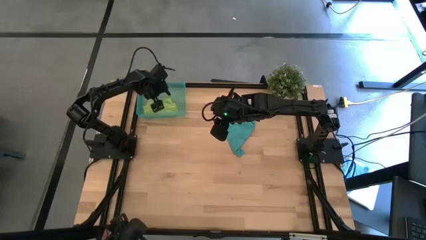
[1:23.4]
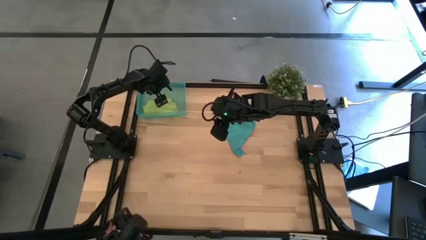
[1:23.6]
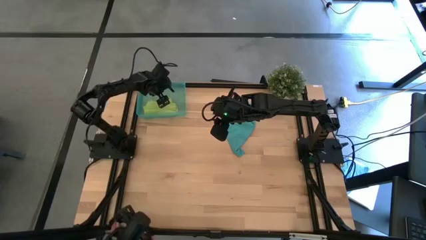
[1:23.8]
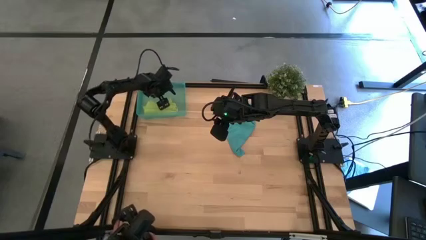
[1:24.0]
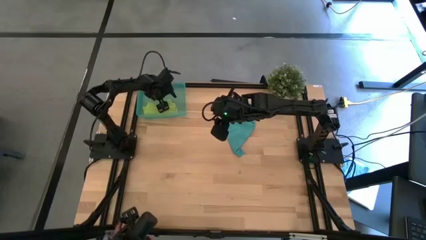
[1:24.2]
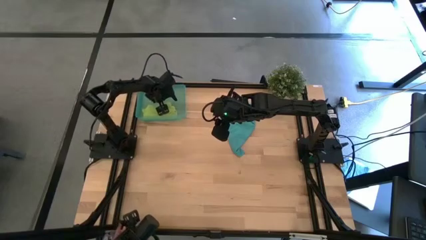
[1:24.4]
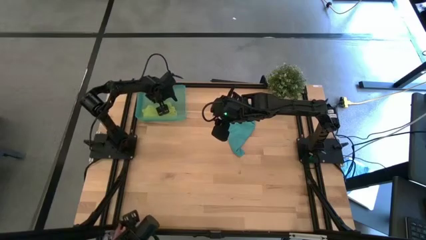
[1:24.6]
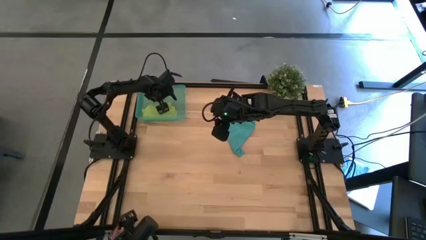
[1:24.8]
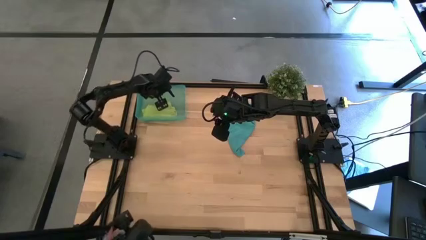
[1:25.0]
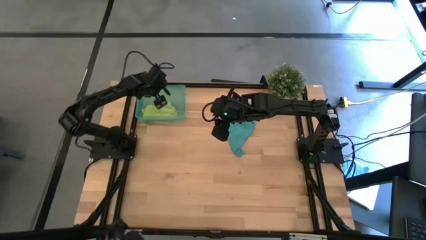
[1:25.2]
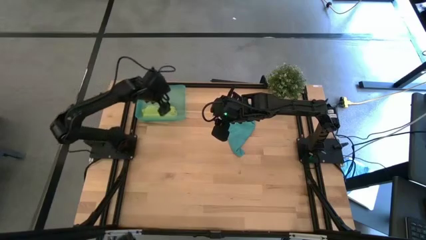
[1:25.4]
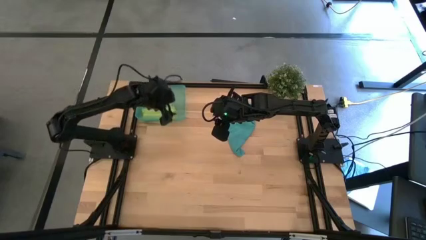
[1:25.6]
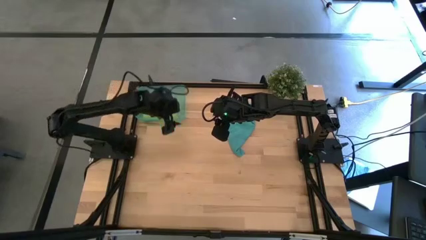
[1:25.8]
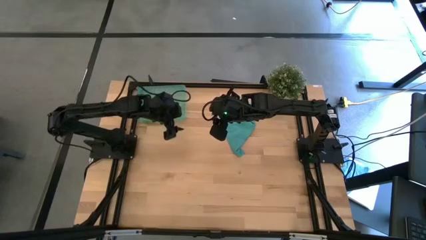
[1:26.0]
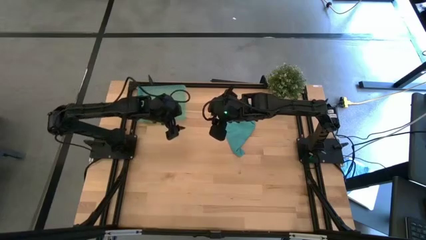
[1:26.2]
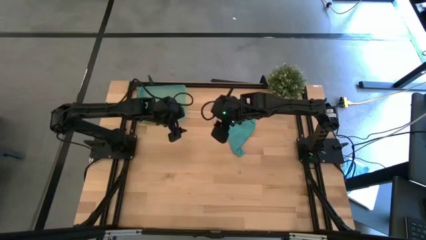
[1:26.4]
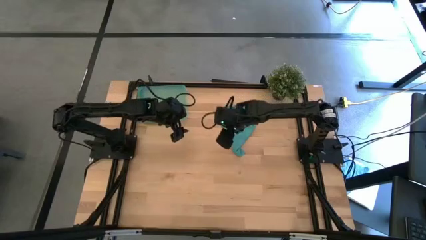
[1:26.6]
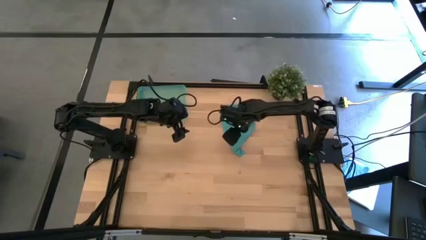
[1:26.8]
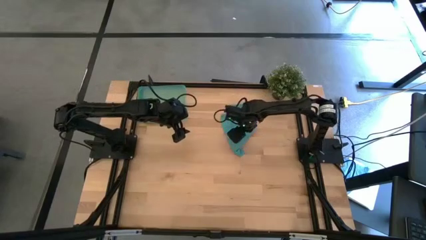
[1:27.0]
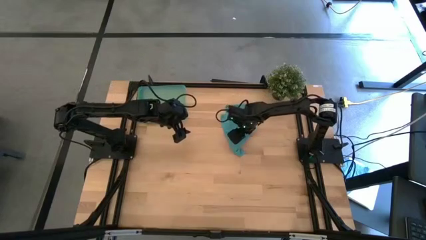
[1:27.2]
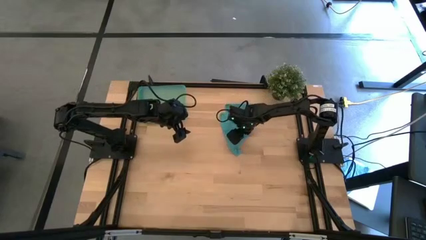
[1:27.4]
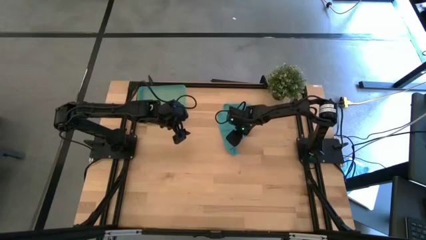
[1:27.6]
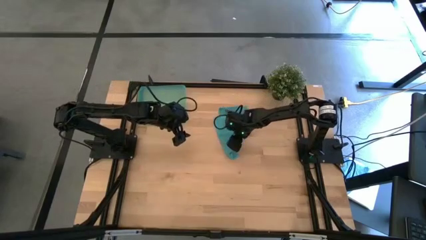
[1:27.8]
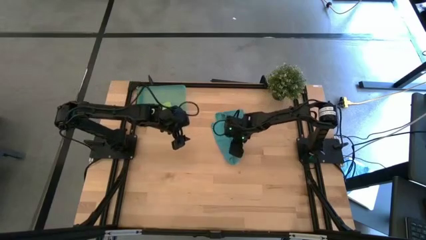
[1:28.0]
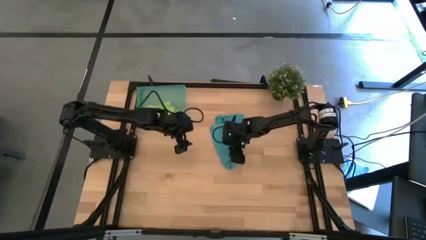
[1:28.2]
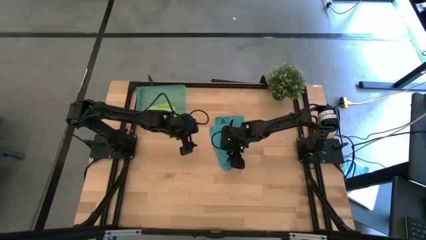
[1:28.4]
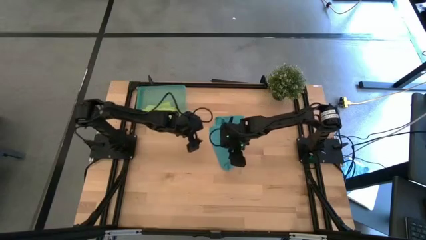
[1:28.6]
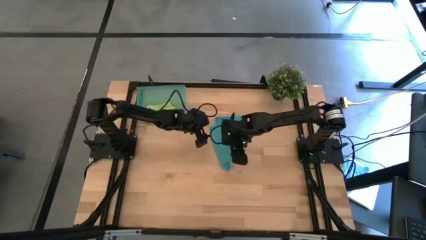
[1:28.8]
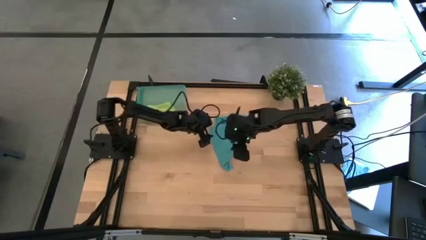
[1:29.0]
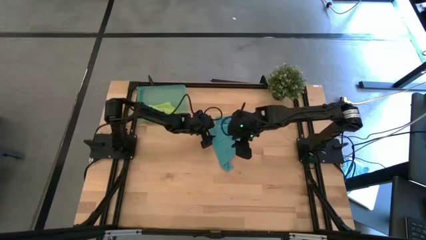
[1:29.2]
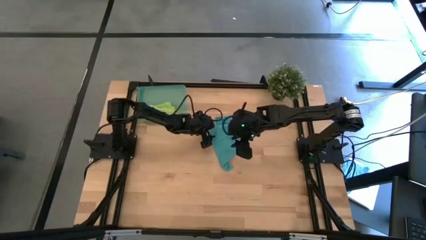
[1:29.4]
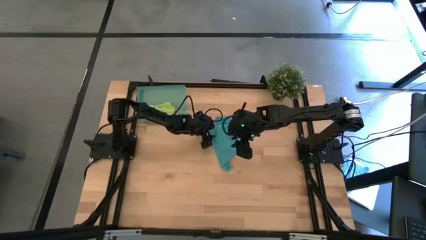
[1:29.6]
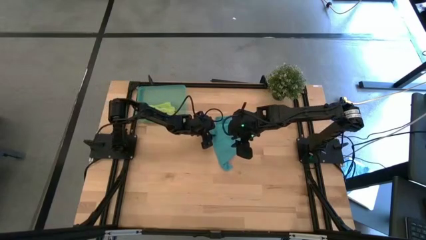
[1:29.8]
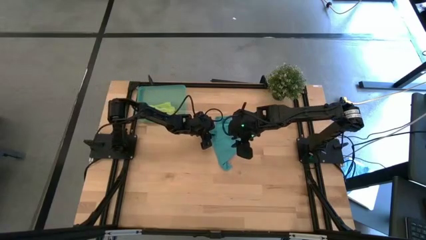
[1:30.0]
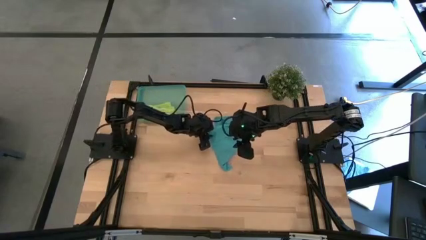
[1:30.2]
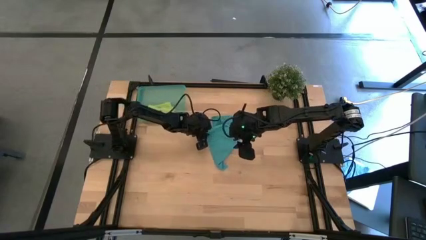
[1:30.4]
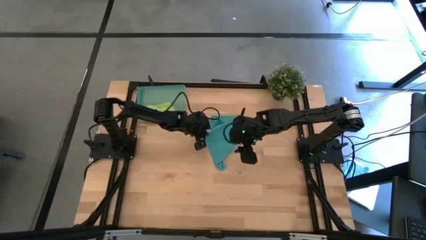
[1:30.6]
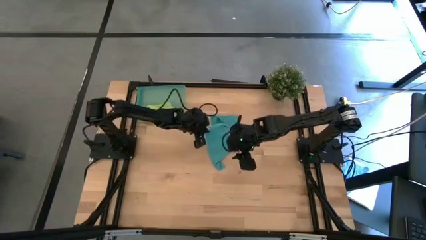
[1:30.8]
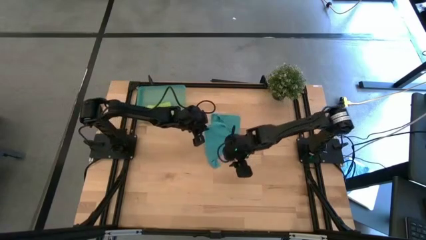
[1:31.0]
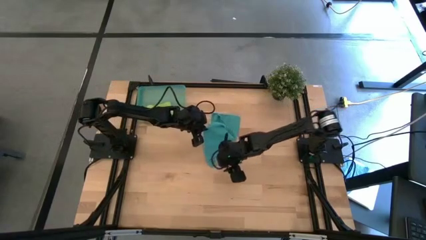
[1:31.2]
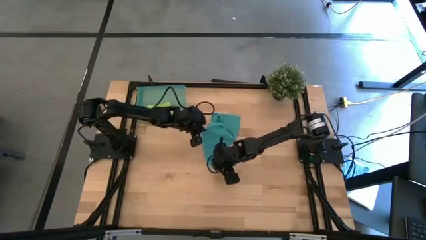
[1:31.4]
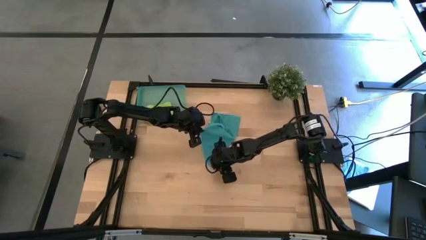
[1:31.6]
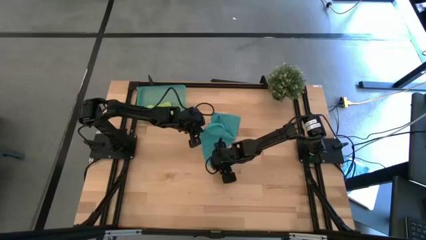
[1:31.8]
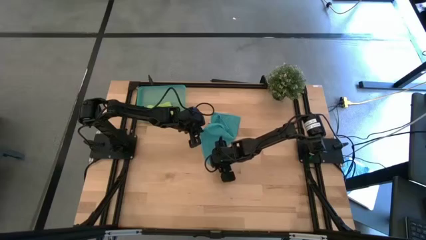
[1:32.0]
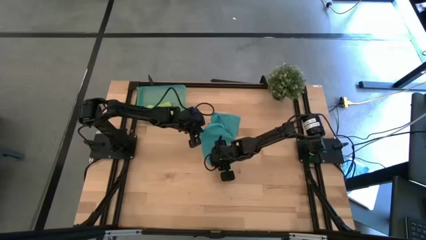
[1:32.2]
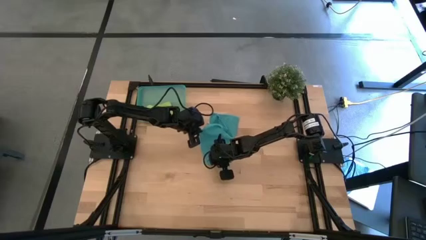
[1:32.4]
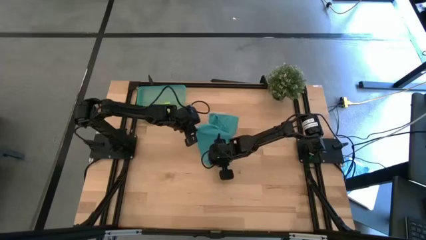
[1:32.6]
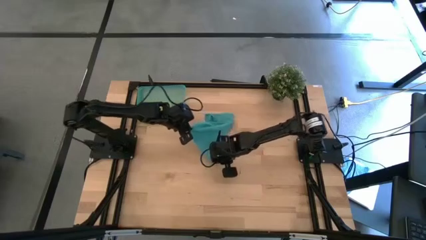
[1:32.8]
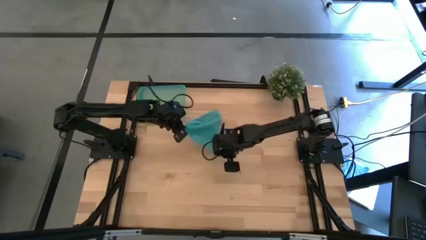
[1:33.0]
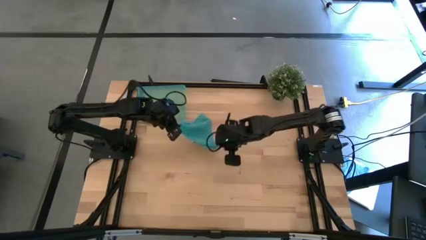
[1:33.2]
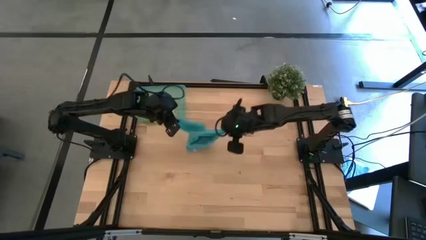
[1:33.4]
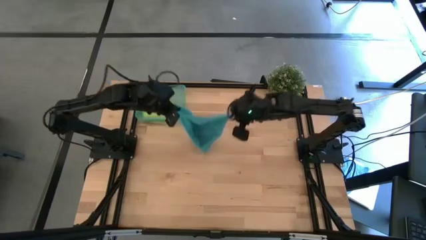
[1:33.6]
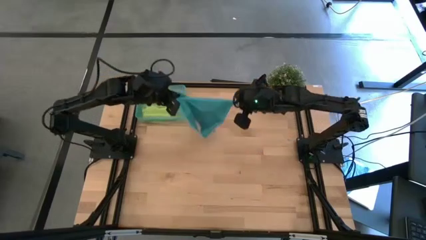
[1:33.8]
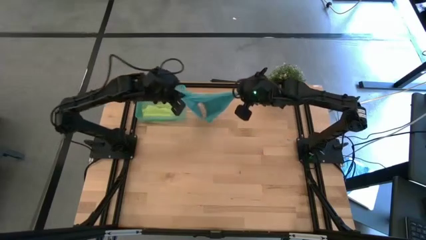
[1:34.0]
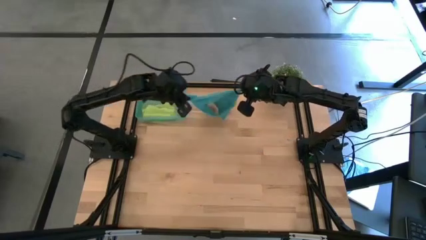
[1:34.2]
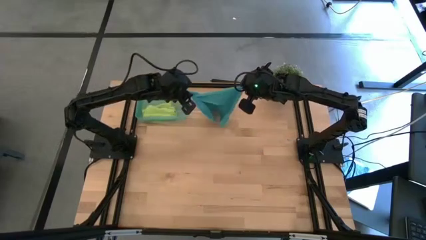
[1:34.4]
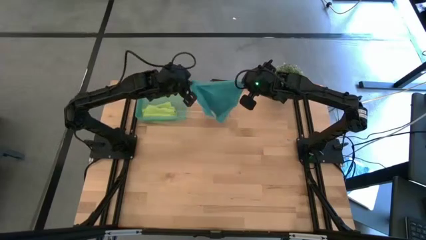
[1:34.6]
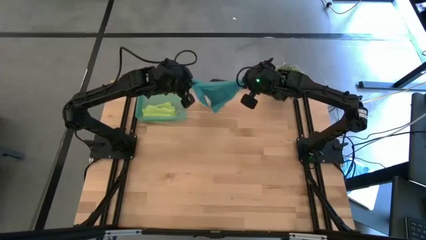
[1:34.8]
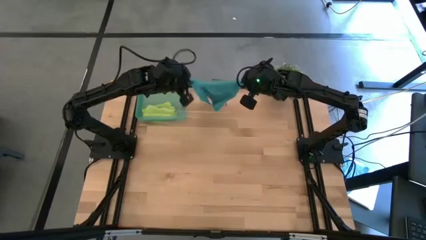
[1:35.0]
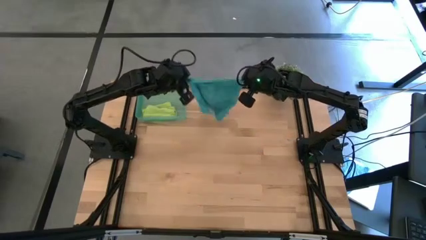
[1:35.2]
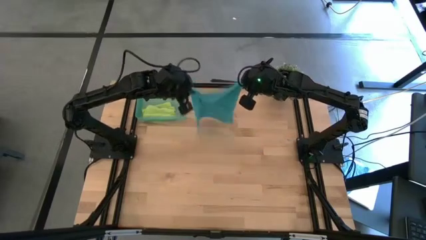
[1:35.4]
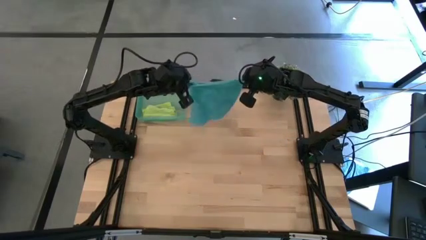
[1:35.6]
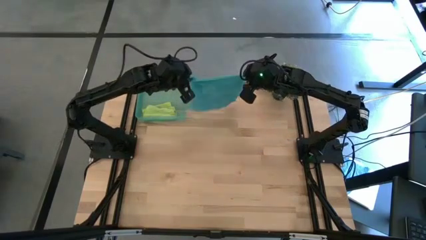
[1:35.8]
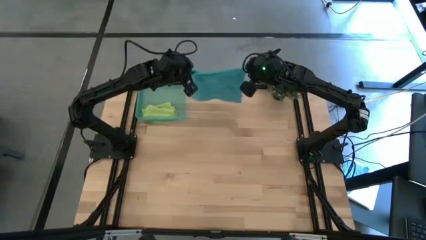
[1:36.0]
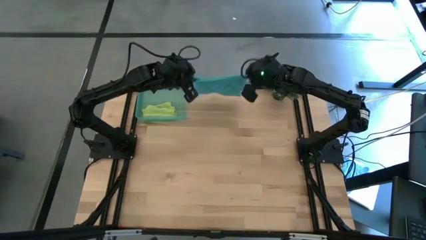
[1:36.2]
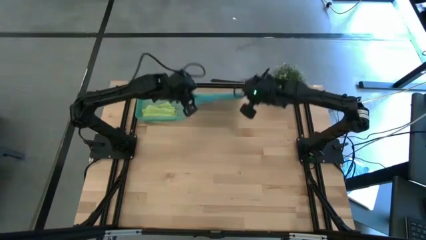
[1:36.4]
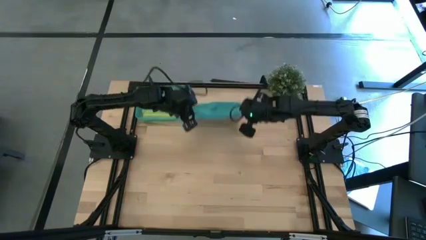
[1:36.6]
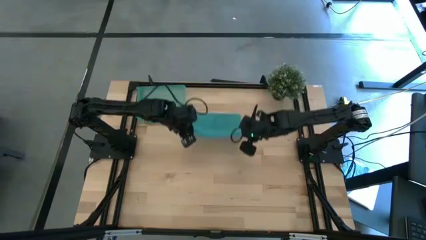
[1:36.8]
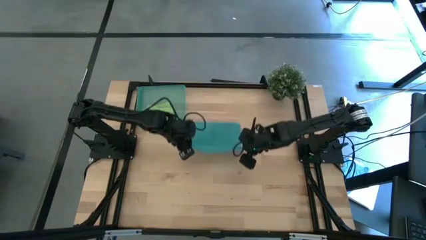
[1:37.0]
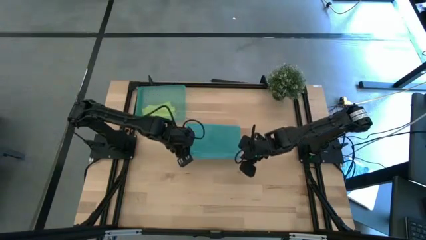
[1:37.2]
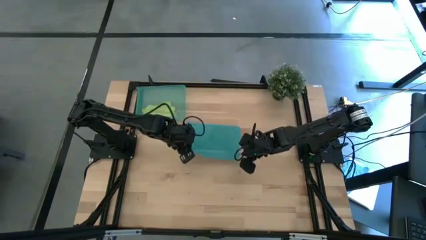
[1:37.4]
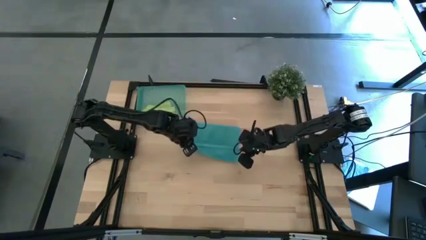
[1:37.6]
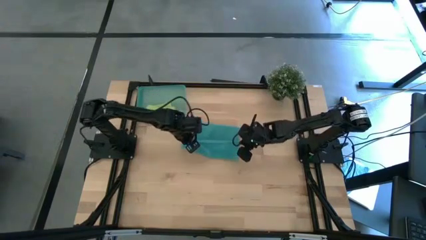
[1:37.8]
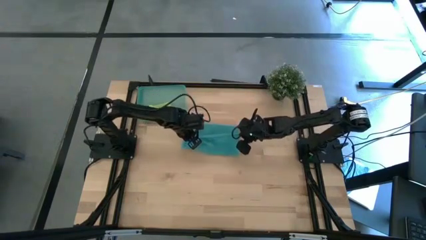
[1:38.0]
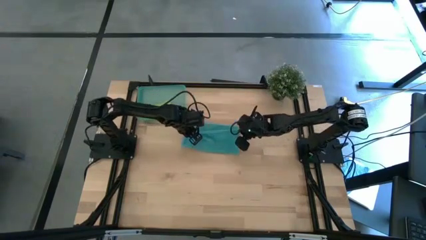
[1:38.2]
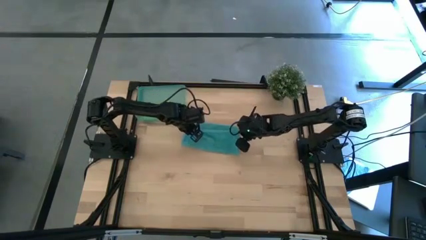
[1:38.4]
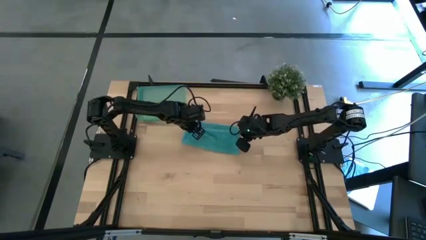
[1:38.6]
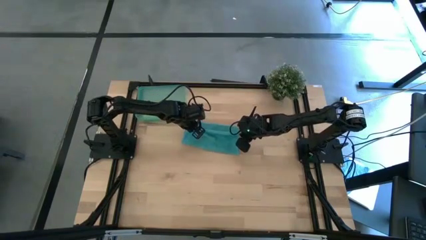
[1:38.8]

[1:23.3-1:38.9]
Task: Roll microfiber towels into tight, uniform cylinder then place into a basket
Roll the blue microfiber cloth

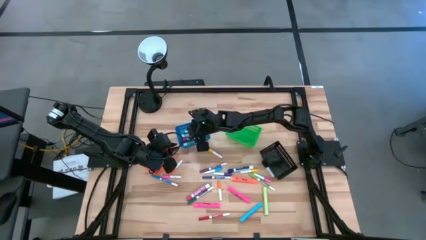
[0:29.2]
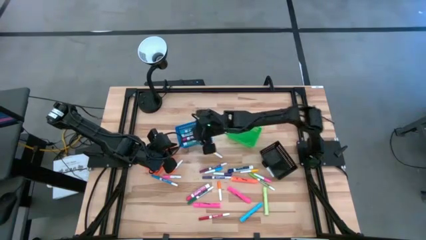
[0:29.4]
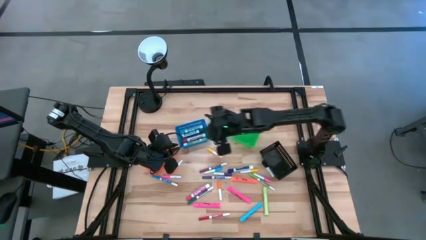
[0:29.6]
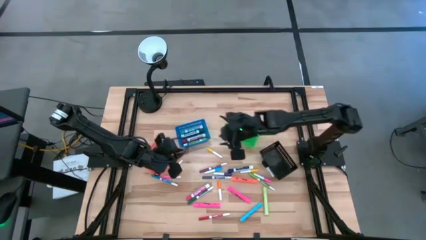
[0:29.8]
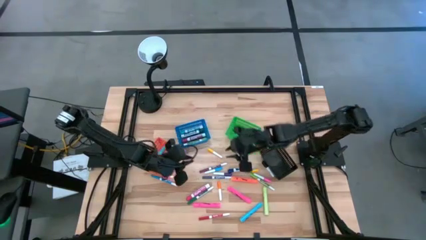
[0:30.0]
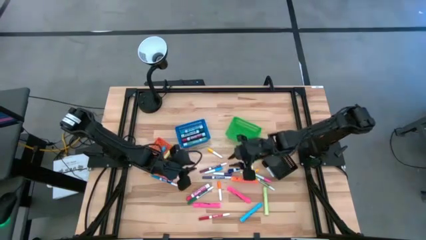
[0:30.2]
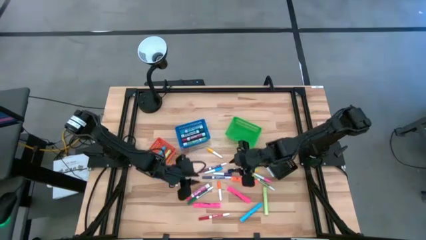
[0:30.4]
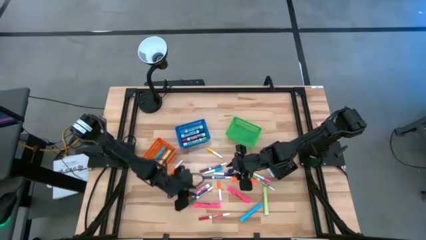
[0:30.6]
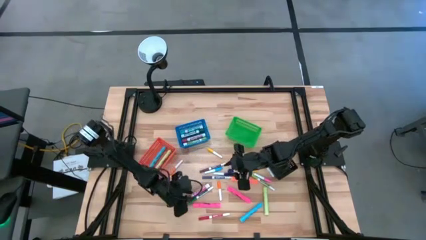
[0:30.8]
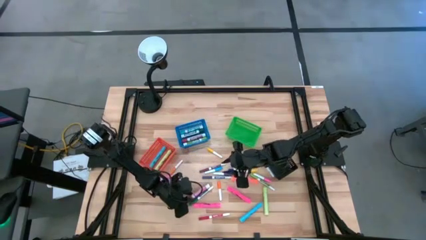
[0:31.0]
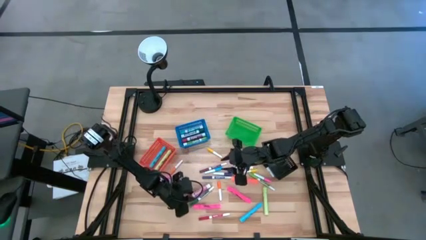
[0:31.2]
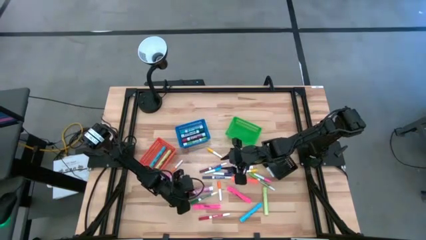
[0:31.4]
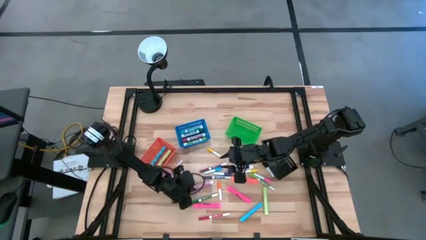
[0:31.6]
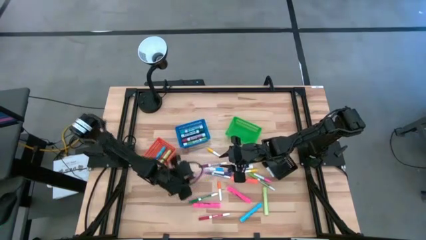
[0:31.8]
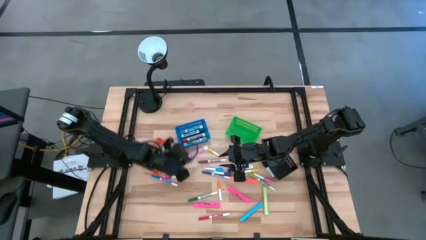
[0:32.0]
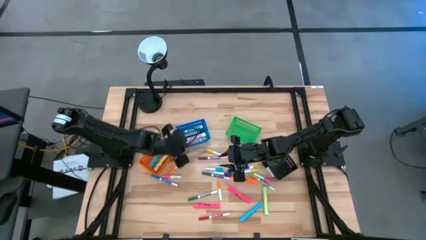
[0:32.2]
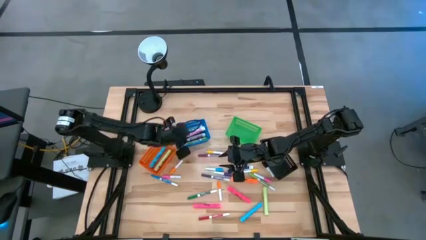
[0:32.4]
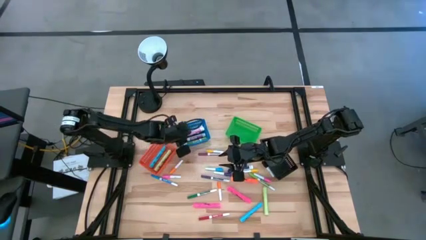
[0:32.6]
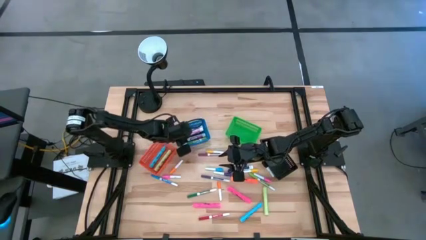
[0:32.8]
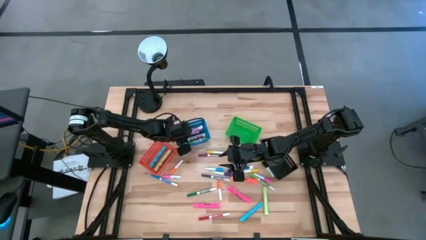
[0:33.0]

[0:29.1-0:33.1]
Task: Pick & Place Markers
Put the pink marker pen into the blue basket
